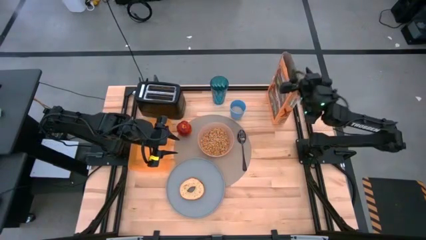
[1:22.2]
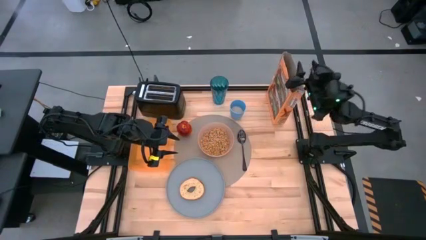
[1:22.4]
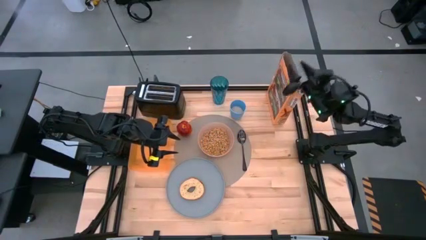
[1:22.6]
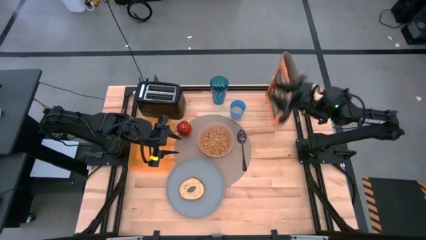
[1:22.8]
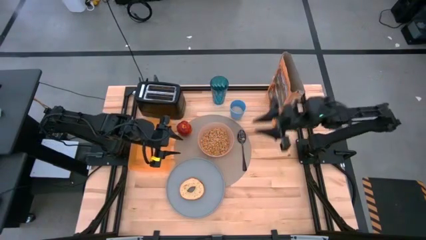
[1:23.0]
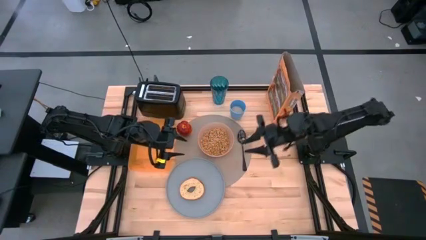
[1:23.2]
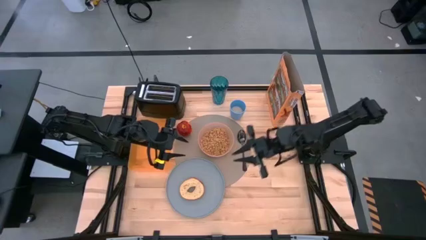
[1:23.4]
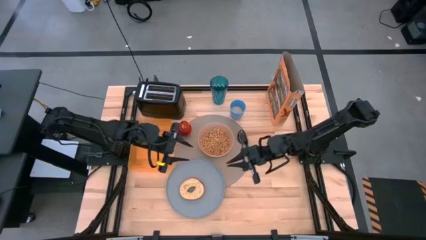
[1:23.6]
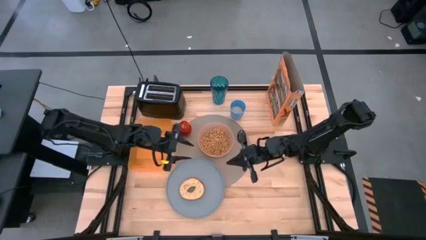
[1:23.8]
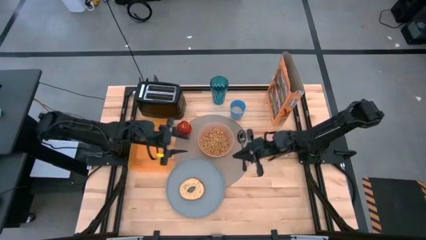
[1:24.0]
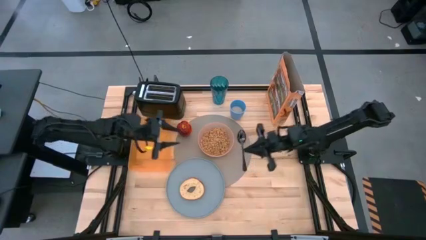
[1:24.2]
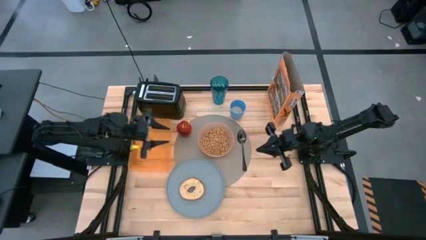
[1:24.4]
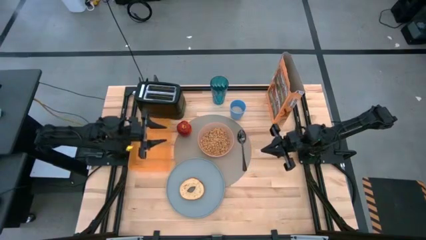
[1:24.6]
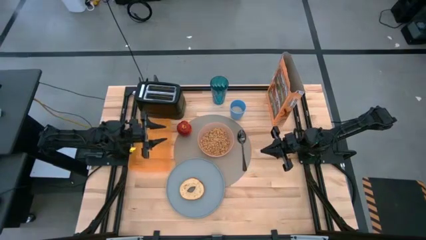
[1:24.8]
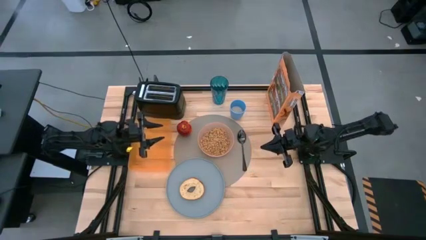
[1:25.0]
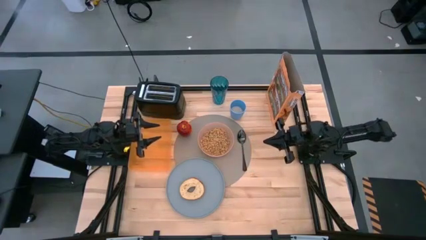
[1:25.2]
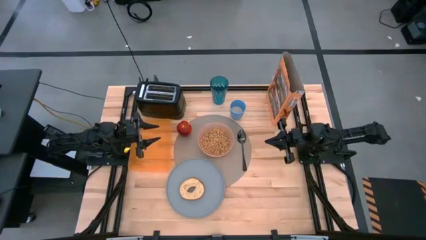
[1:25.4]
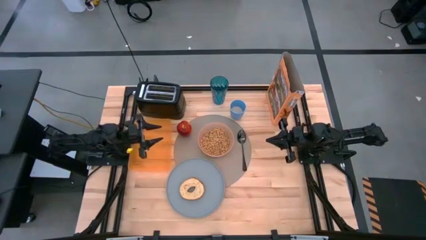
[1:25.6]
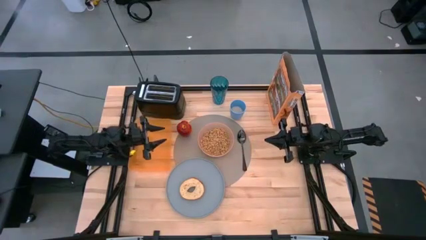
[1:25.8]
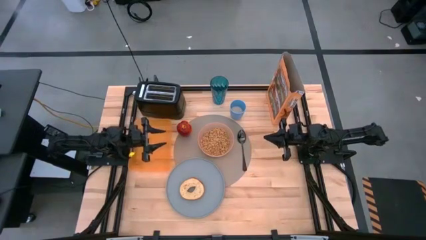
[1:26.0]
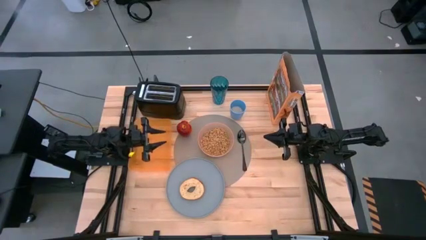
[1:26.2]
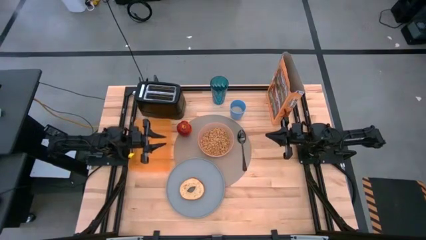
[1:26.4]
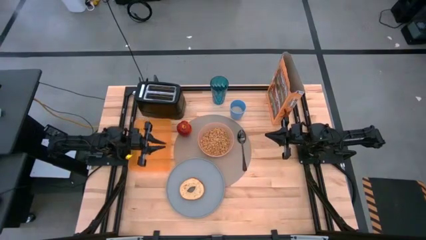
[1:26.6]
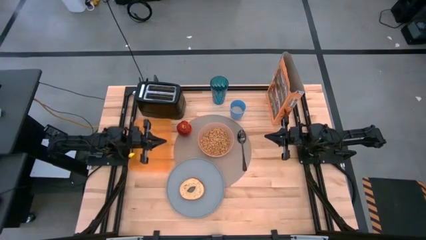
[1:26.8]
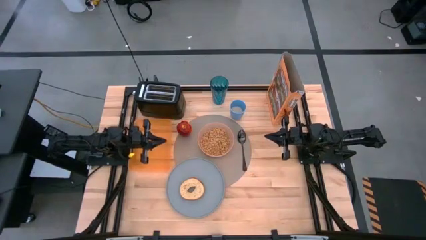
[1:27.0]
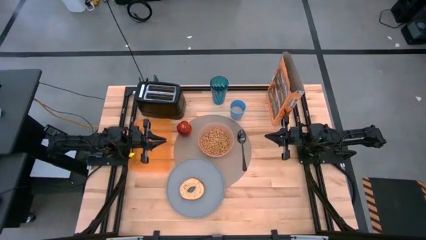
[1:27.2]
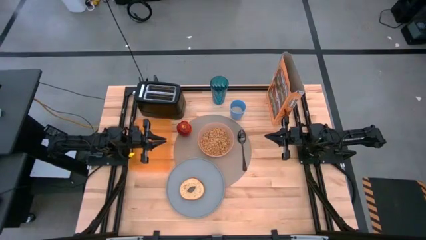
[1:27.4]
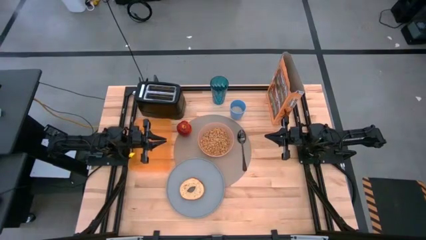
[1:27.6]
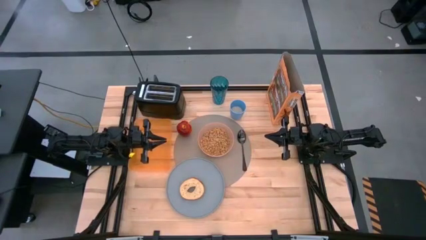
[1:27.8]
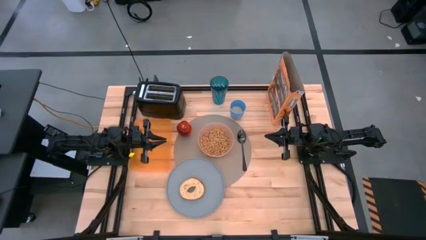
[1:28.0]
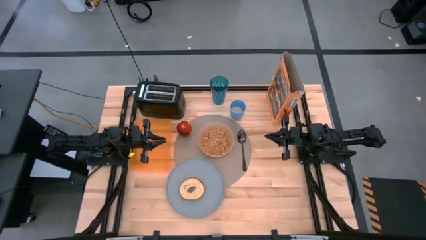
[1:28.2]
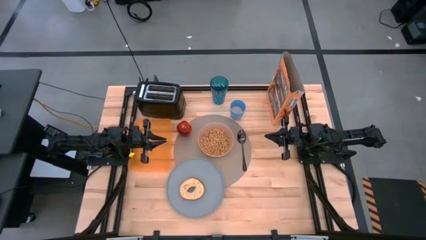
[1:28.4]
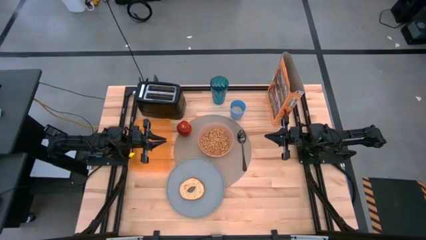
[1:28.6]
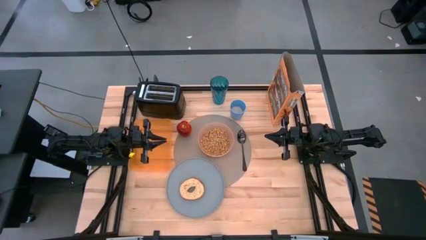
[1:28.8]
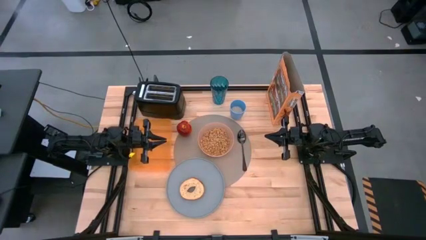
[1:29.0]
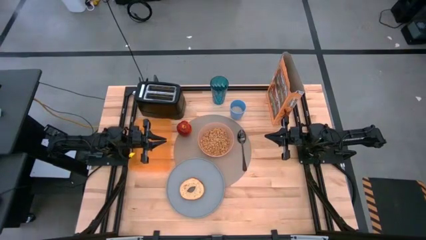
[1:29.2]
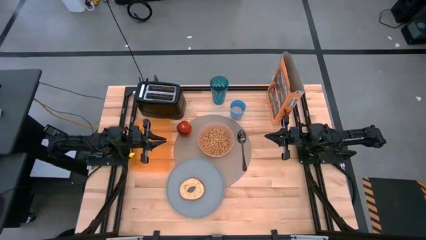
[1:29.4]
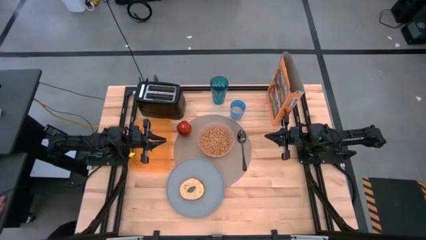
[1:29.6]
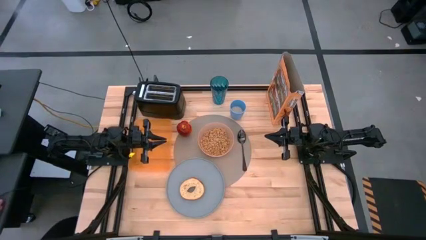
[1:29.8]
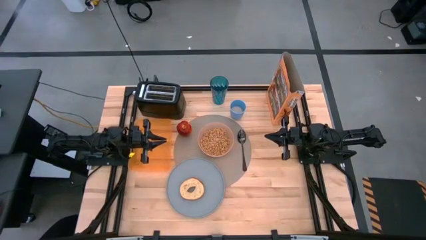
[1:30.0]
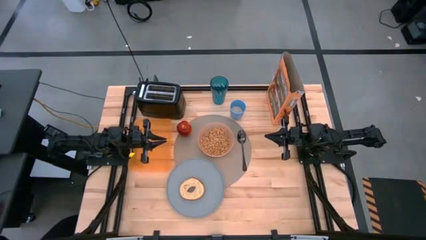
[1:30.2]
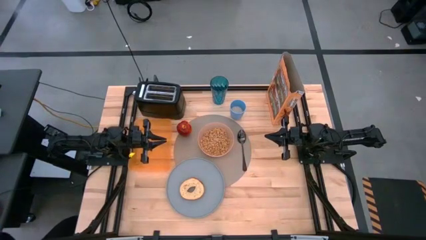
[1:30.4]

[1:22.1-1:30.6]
Task: Arrange a breakfast setting
Return to Home Position

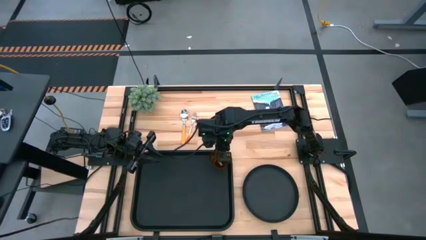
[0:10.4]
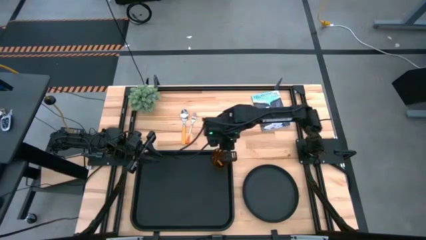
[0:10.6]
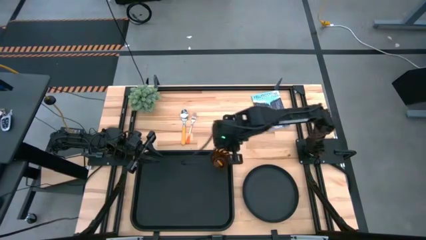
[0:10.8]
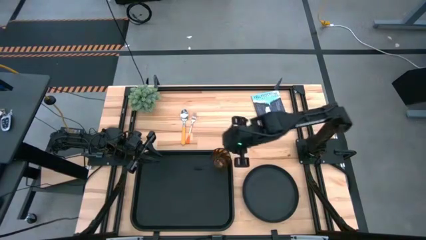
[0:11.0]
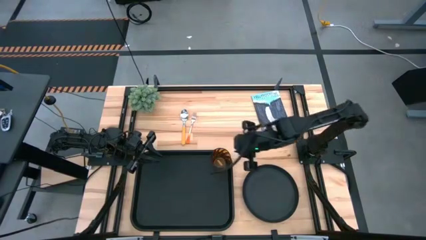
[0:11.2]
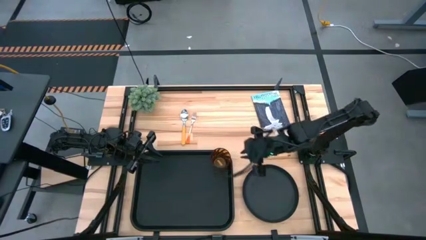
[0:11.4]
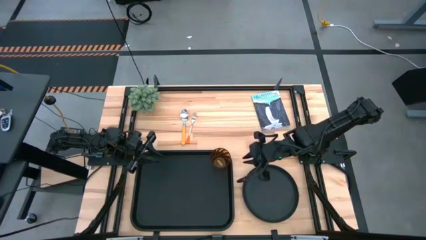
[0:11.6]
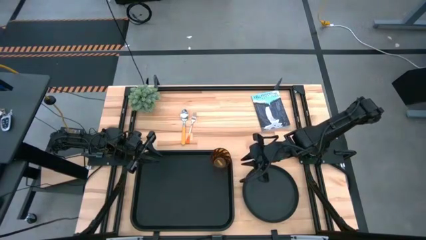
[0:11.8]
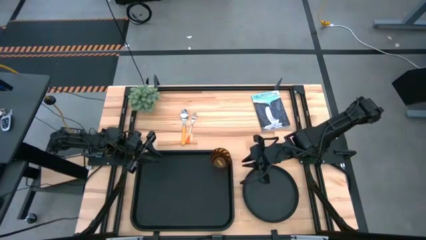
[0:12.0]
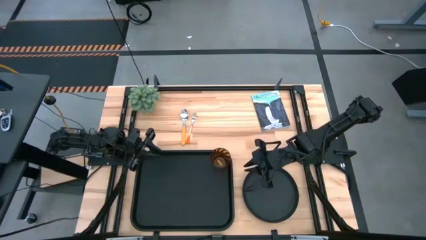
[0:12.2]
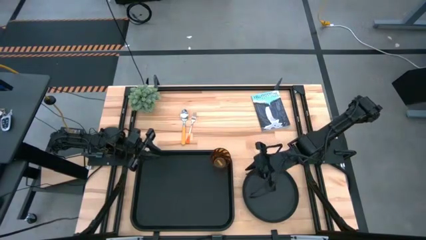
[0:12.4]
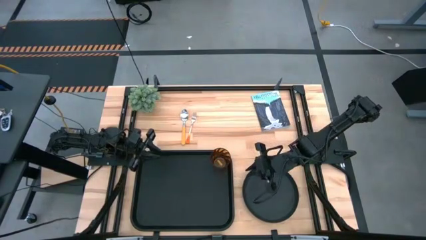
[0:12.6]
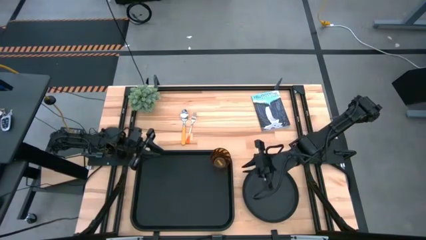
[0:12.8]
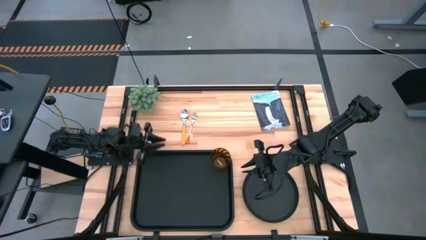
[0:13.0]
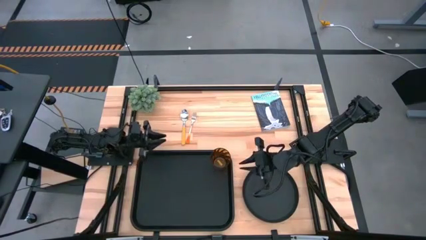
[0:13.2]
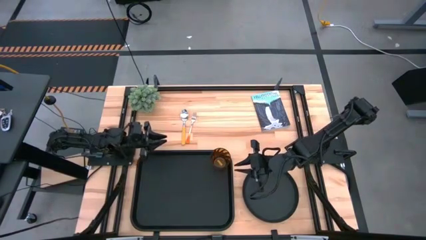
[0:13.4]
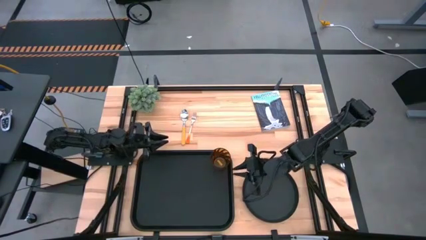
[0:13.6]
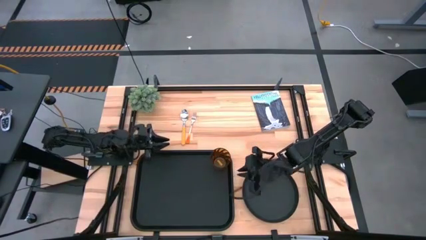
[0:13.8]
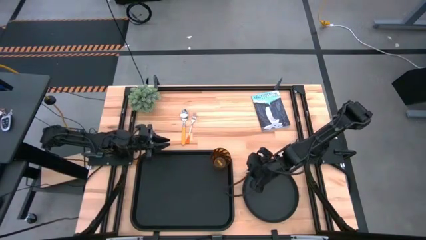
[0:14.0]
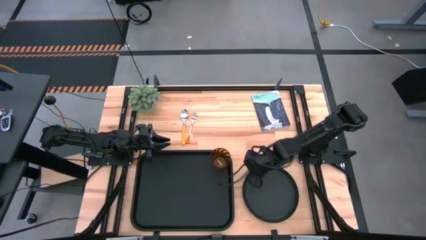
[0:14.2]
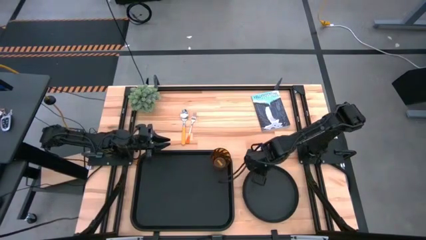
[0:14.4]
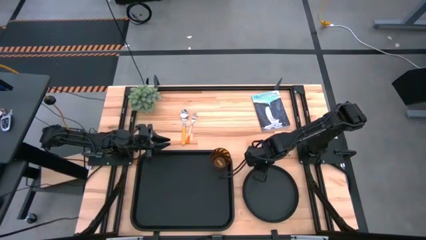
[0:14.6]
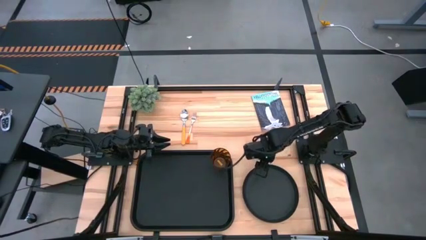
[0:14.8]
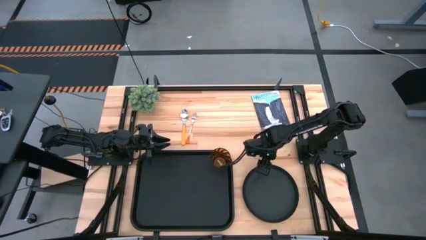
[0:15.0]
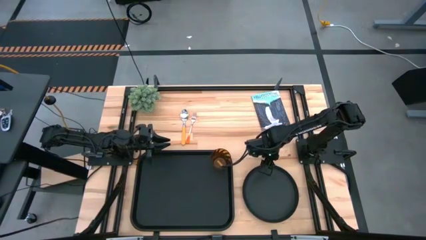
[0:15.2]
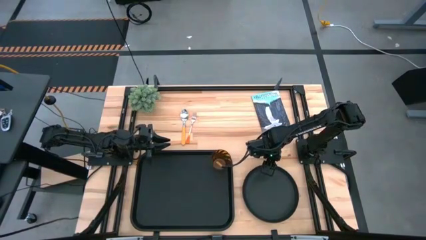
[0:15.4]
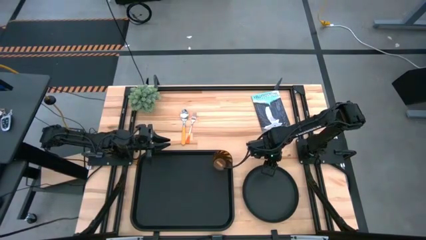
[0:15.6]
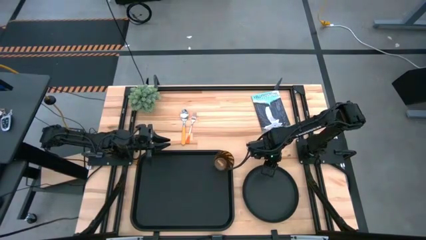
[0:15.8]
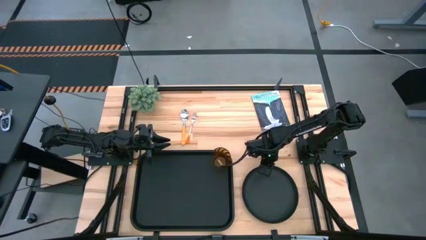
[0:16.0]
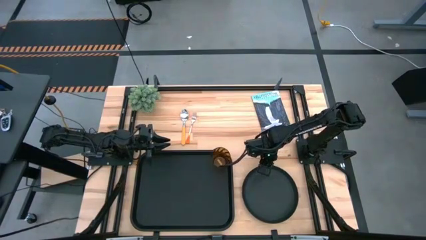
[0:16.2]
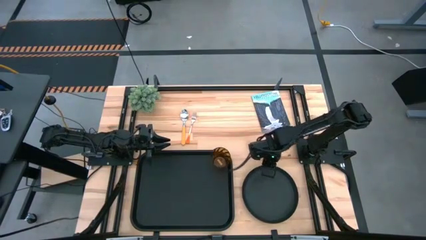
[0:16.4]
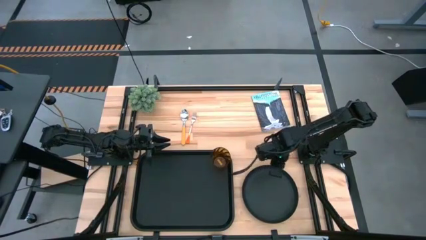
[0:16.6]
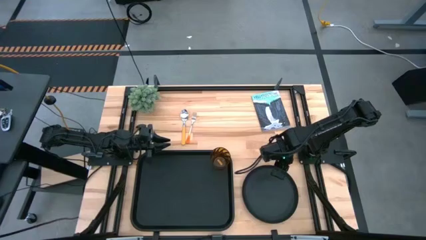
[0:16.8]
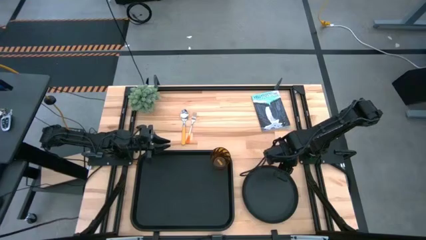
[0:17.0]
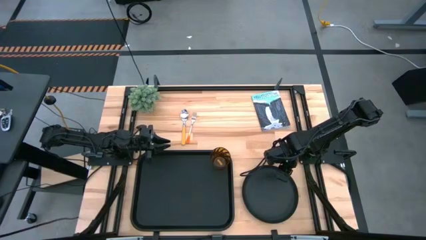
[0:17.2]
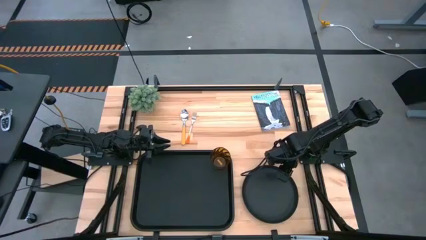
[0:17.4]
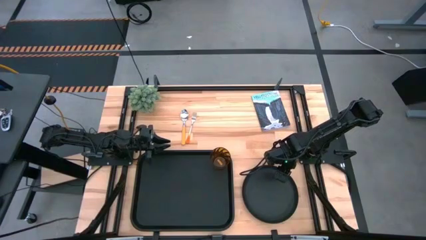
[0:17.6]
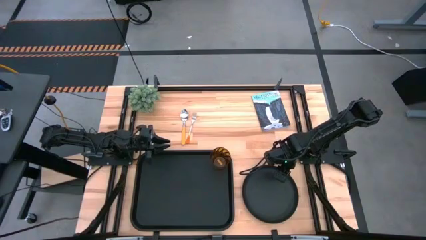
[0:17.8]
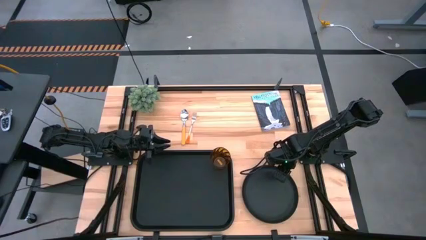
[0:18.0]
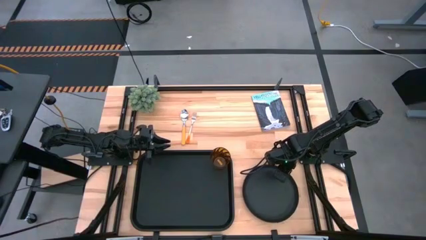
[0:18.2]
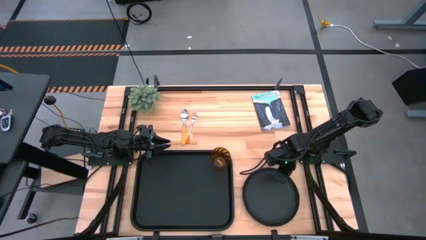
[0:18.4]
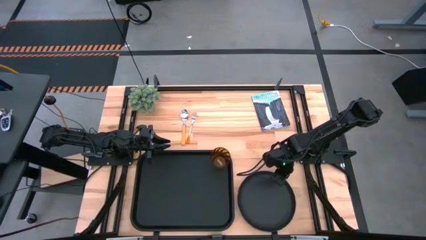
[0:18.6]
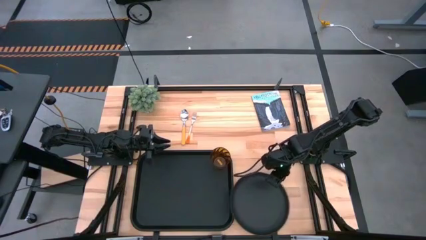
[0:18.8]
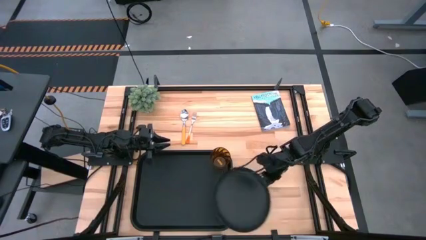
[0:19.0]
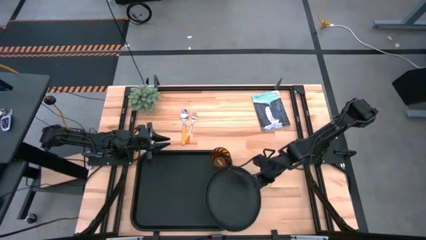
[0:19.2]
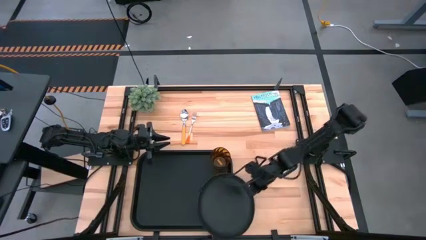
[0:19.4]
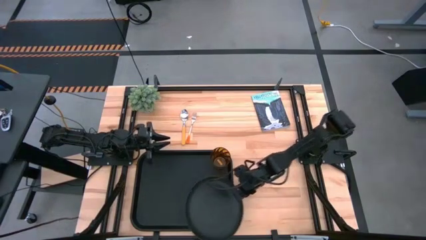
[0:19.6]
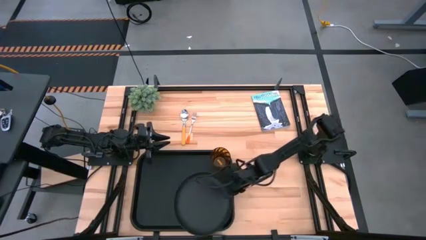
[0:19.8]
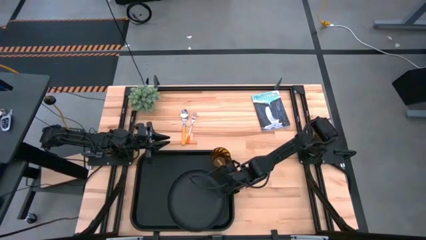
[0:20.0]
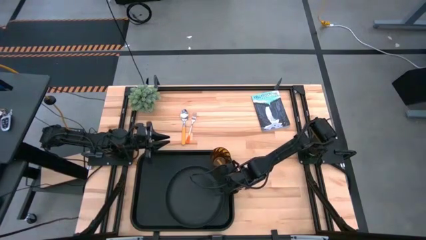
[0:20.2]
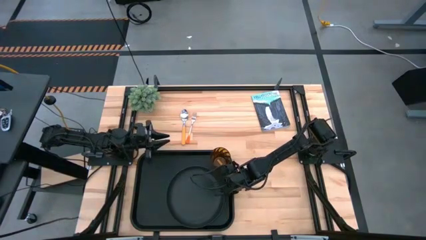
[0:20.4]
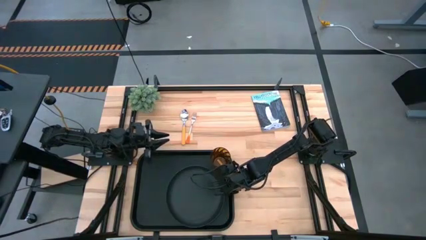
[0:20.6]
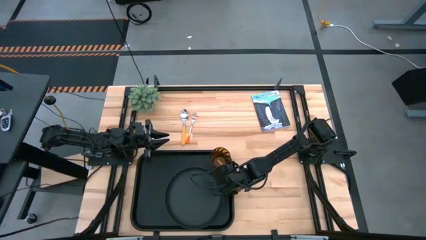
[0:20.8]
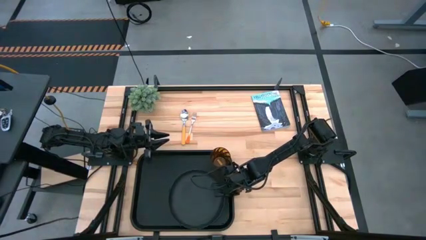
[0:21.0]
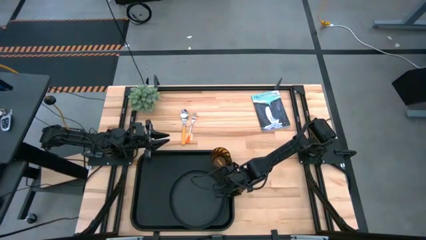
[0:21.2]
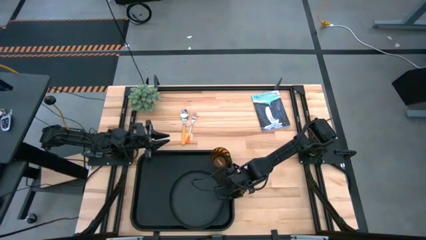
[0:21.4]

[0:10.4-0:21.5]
Task: Pick and place plate/cup/fork/spoon on tray
Put the black plate on the black tray
